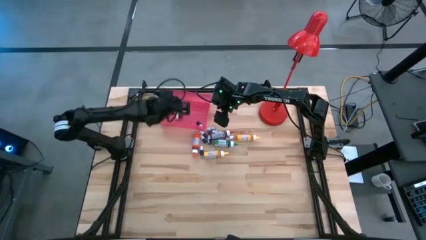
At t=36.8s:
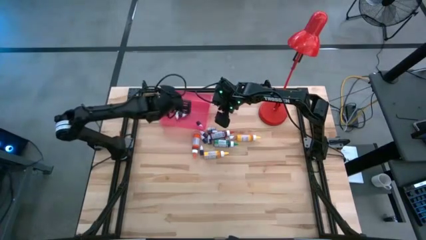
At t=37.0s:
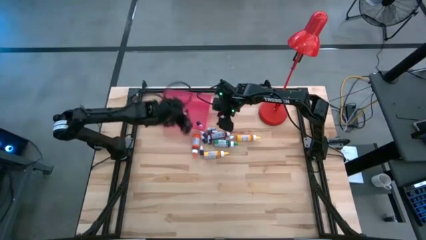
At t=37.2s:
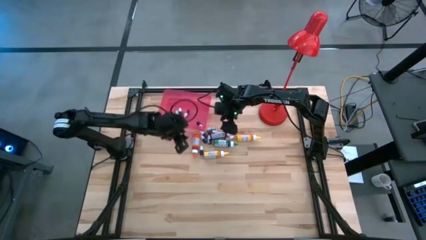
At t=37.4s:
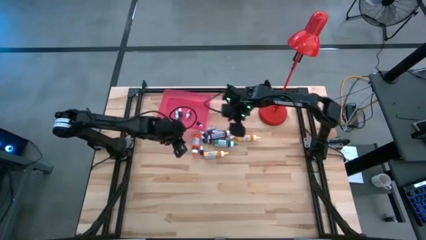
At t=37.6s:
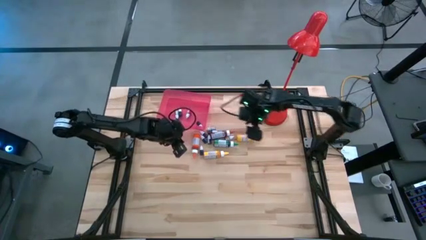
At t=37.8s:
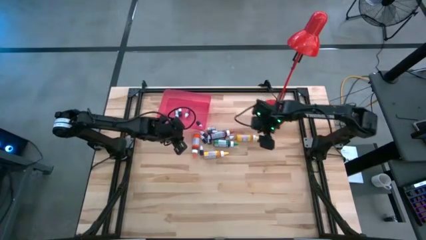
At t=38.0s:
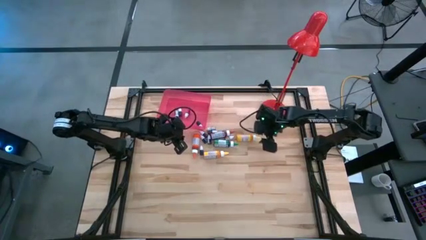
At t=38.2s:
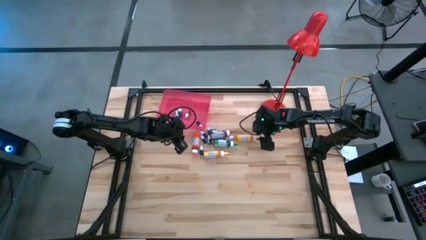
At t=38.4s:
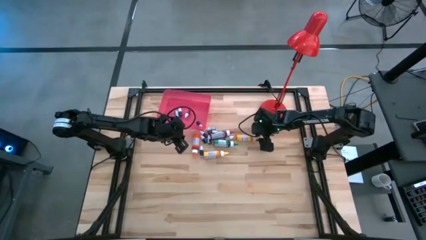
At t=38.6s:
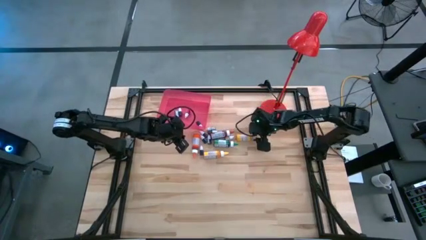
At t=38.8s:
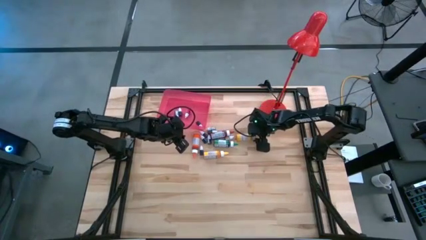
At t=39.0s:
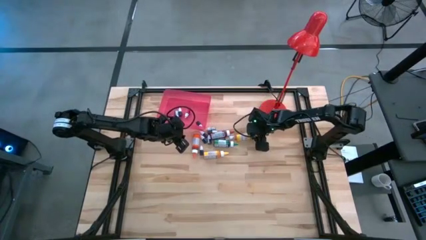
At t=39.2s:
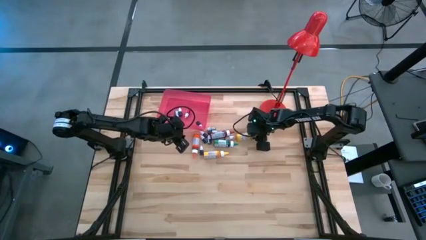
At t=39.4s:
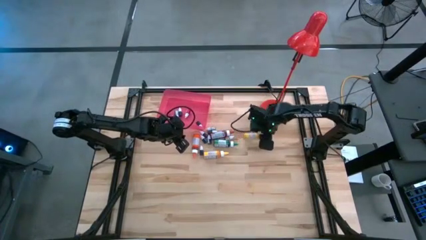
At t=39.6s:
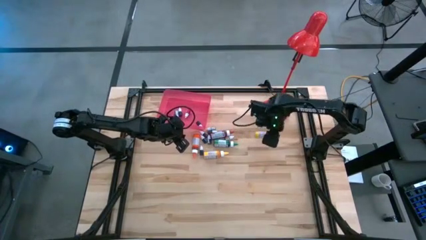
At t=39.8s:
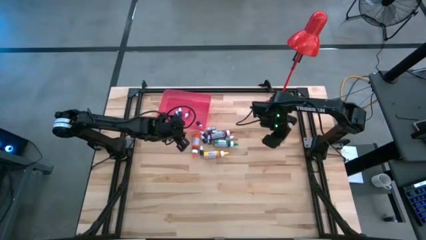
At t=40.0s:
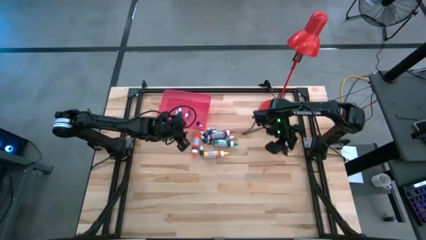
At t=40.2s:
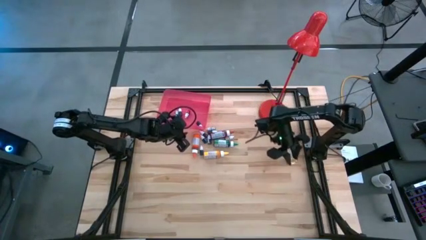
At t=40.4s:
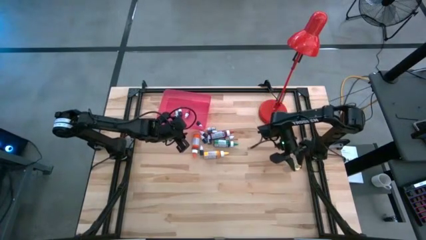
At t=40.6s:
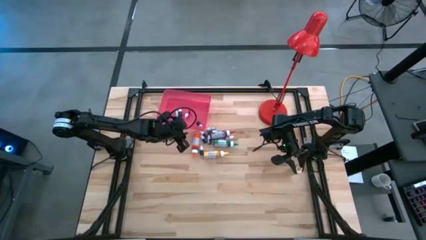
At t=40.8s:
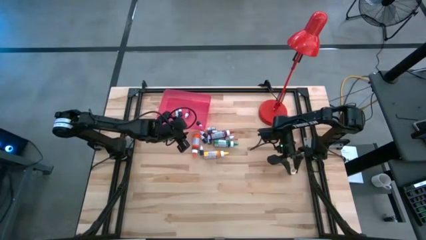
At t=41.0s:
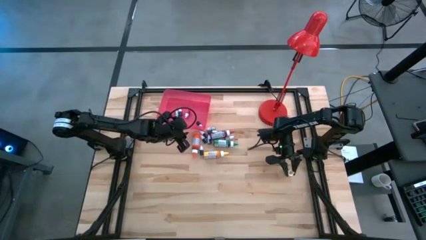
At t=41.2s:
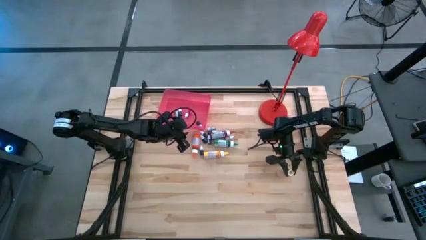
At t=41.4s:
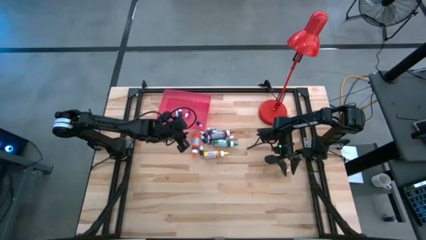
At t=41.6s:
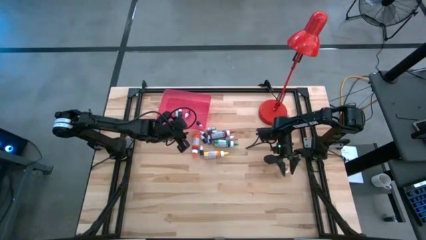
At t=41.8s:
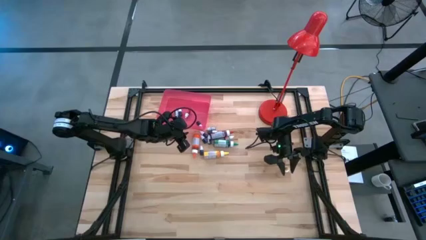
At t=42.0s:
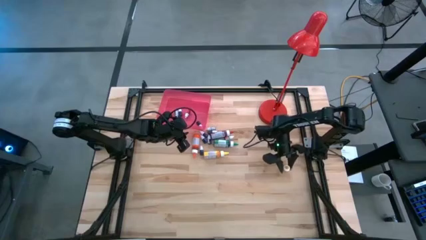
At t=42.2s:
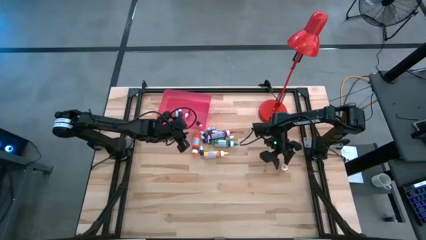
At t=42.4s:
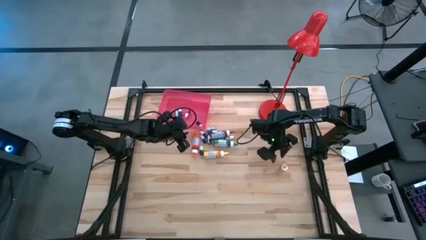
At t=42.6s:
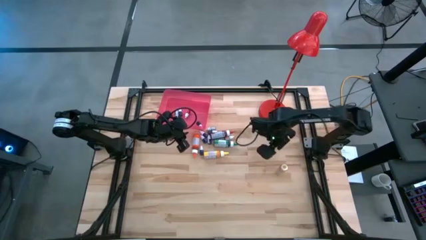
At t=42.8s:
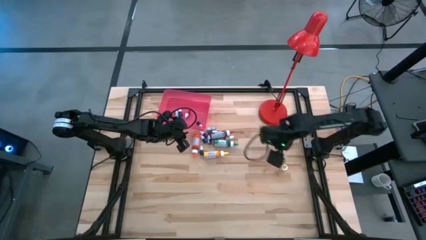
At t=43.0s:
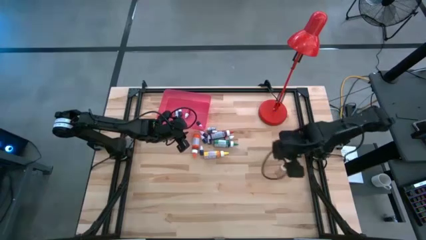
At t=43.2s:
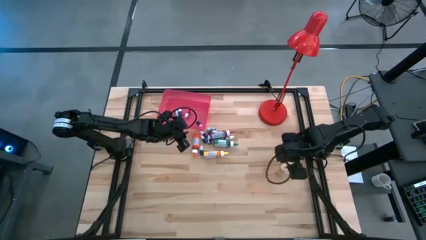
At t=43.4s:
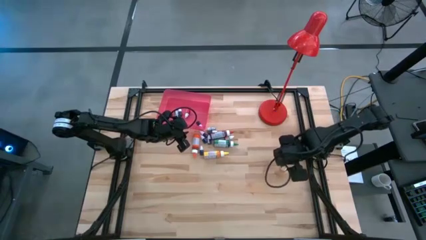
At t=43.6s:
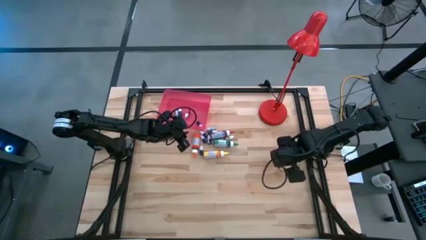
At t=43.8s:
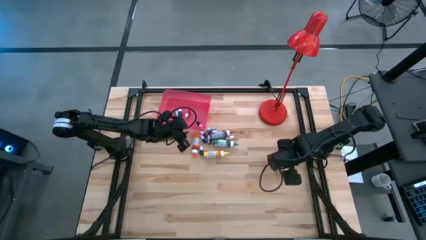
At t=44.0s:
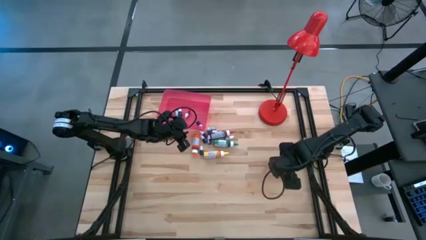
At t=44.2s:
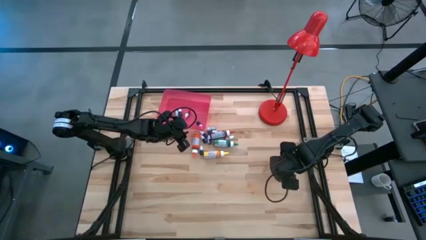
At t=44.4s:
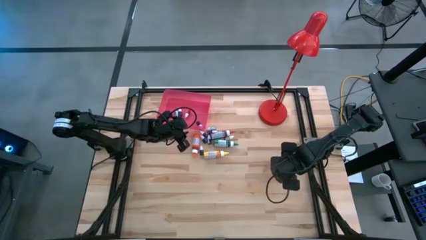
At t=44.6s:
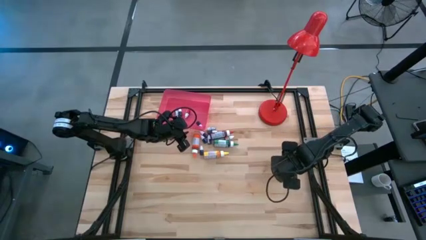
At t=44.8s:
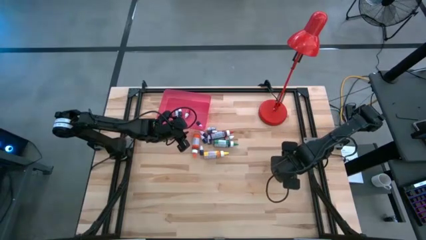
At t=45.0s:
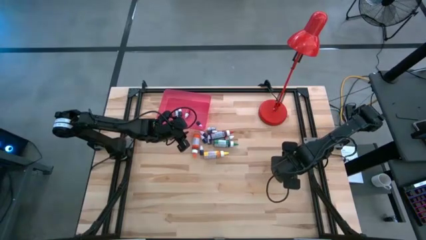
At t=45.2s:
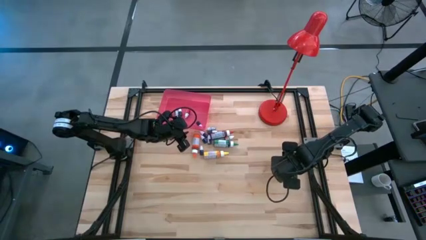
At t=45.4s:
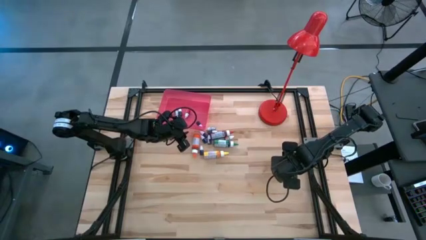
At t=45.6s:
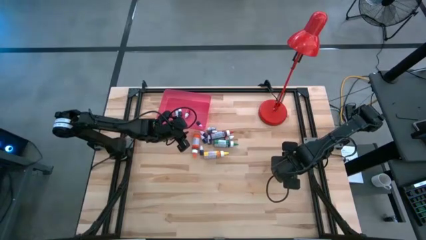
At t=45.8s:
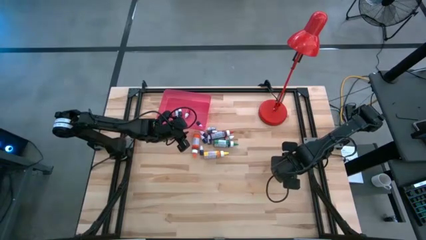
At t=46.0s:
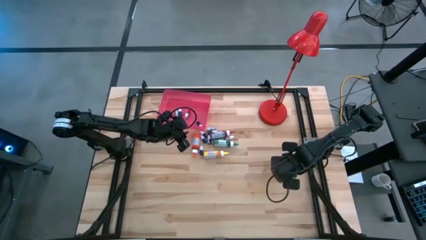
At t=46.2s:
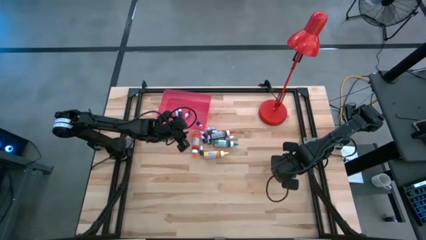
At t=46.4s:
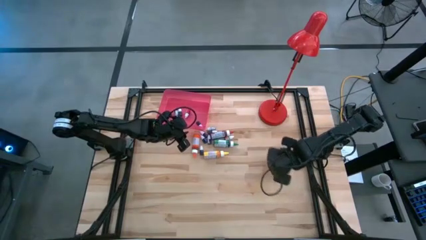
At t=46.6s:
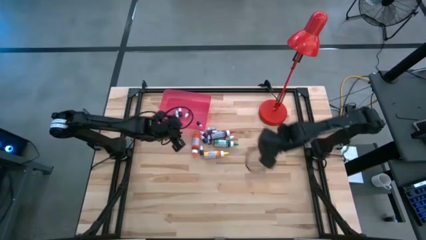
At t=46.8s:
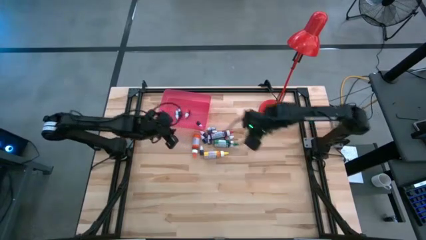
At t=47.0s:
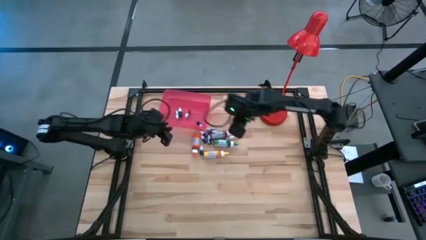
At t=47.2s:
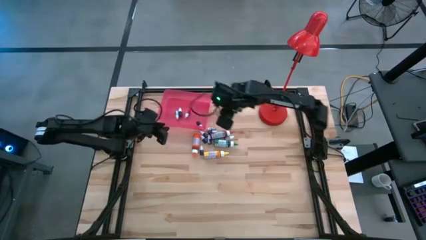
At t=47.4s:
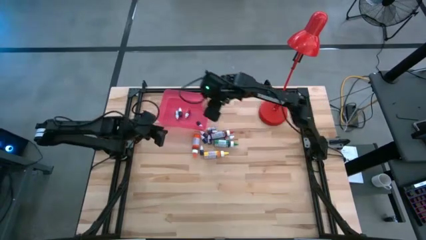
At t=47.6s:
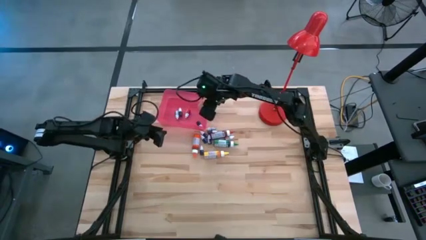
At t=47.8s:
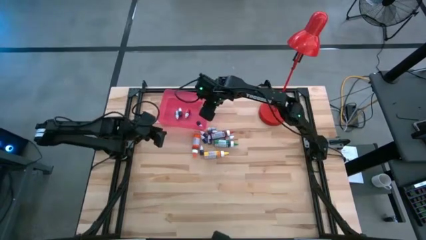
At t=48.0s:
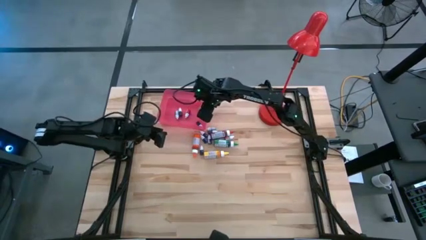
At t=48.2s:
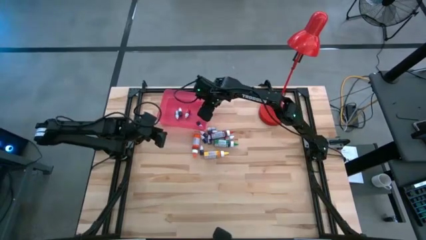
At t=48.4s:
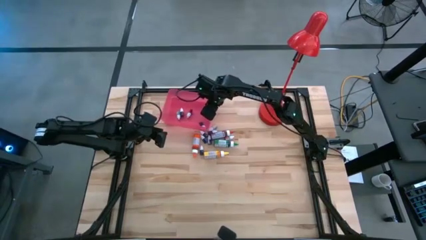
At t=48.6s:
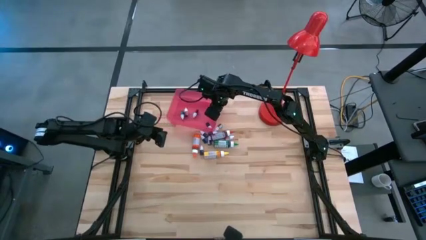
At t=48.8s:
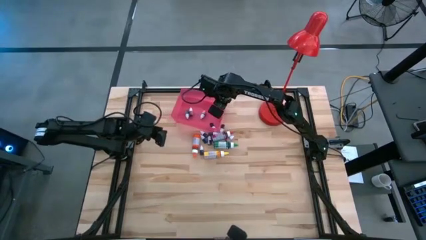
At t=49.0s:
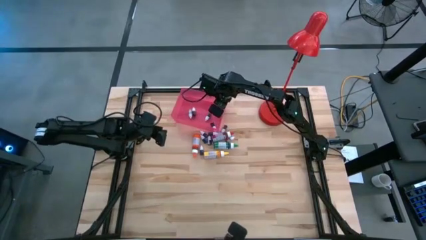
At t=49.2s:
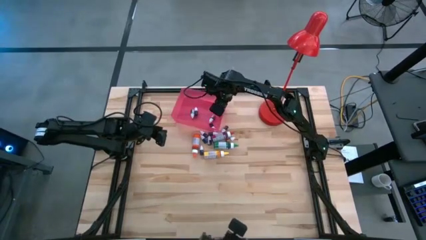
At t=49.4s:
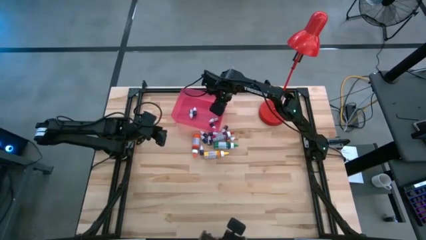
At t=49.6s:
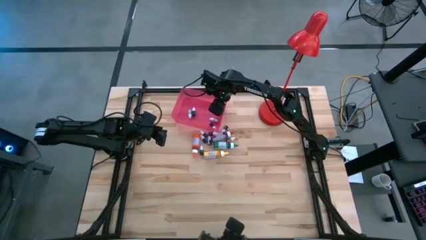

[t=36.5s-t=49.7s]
Task: Pick & Place food coloring
Put the big yellow food coloring bottle into the red bin
